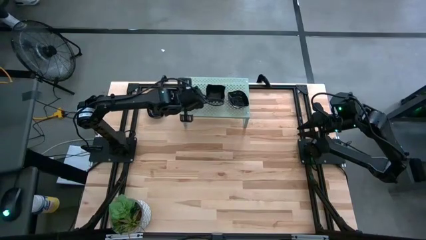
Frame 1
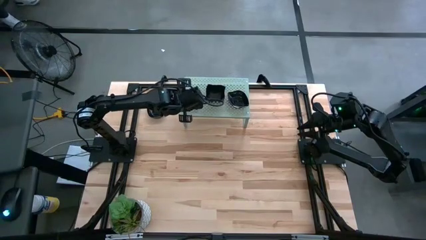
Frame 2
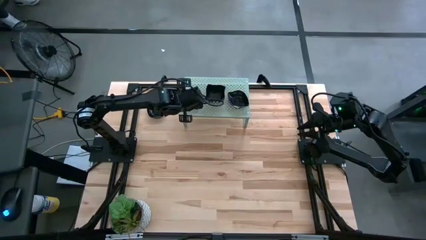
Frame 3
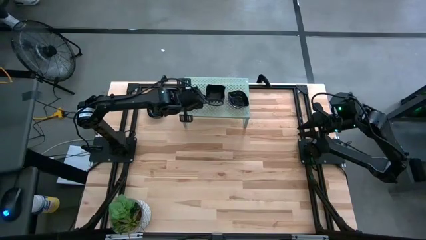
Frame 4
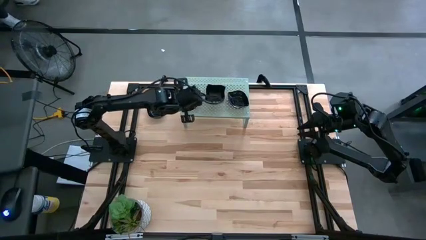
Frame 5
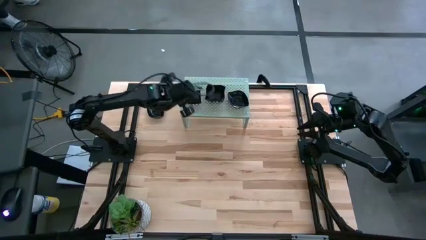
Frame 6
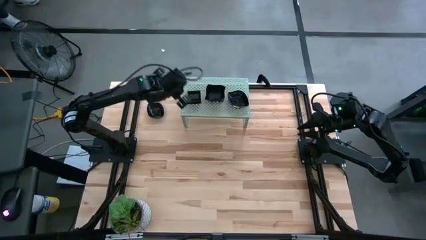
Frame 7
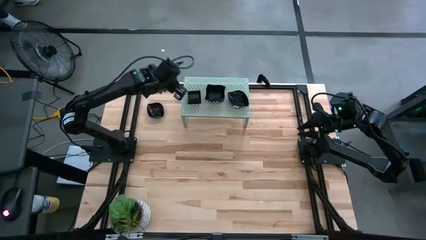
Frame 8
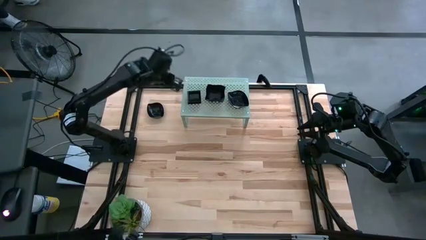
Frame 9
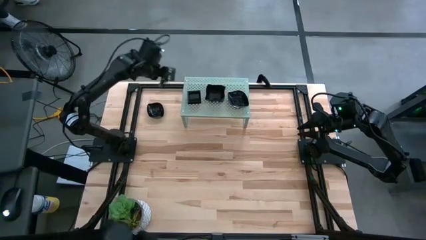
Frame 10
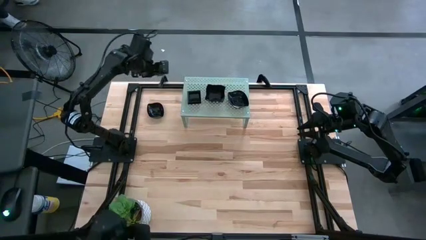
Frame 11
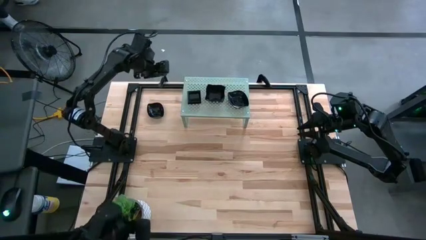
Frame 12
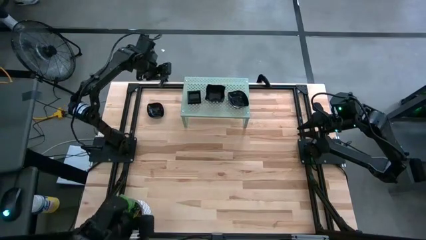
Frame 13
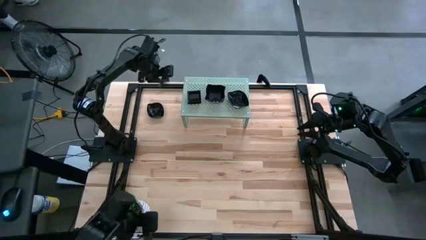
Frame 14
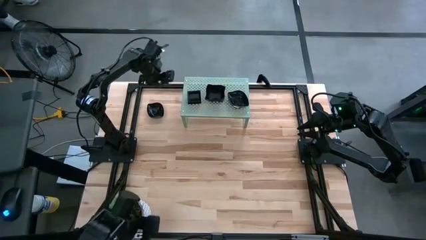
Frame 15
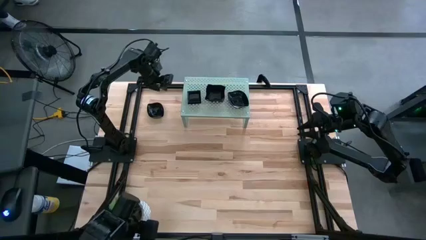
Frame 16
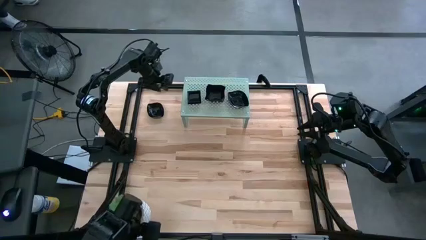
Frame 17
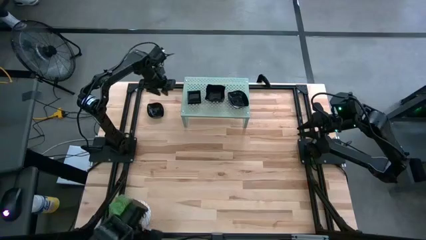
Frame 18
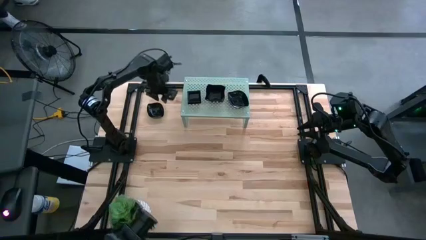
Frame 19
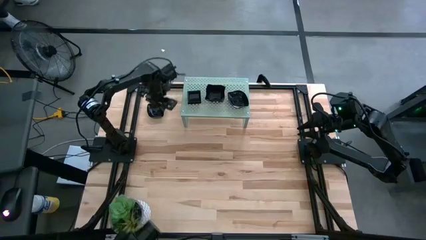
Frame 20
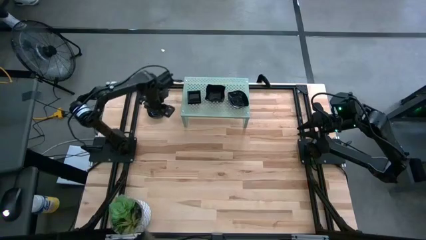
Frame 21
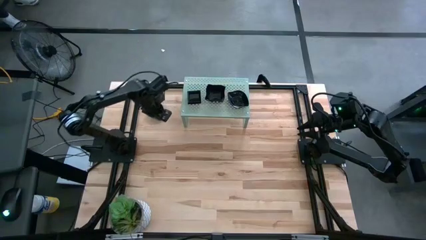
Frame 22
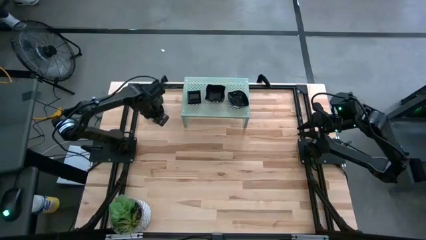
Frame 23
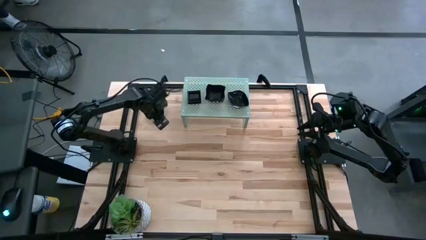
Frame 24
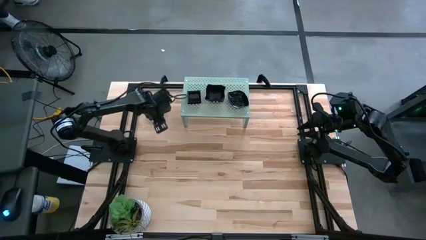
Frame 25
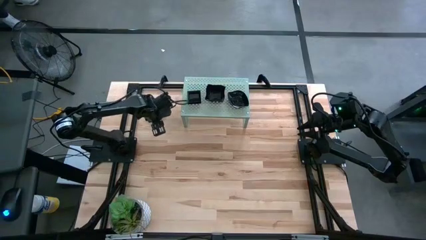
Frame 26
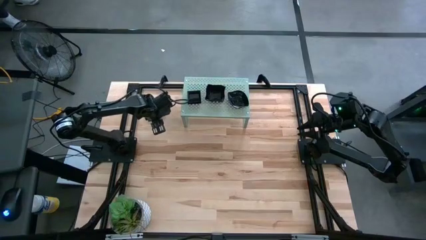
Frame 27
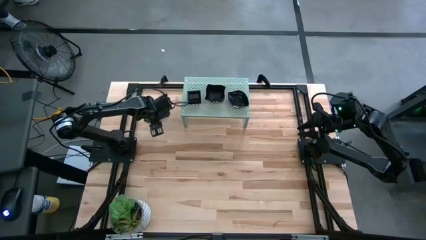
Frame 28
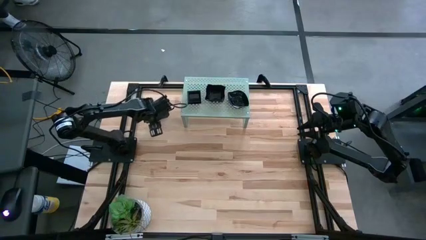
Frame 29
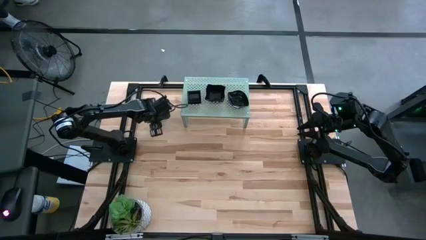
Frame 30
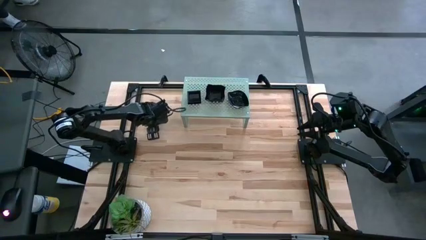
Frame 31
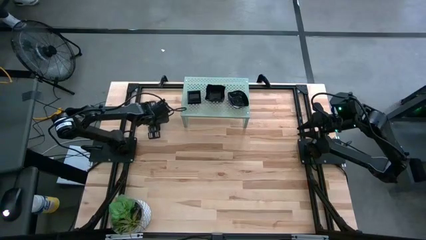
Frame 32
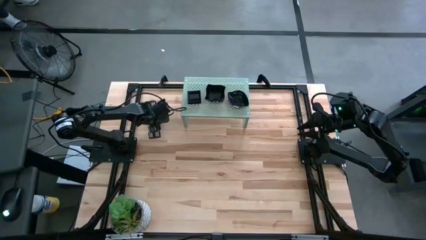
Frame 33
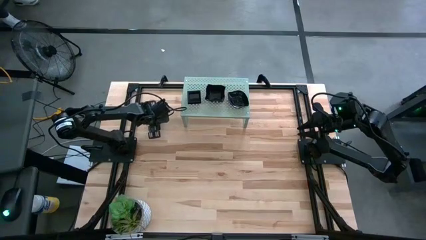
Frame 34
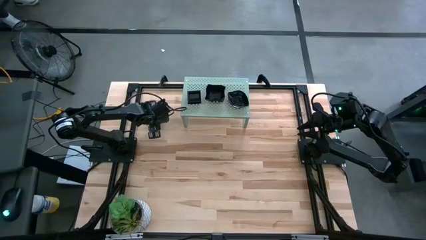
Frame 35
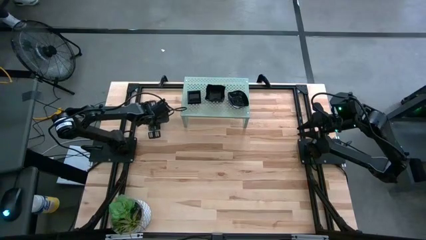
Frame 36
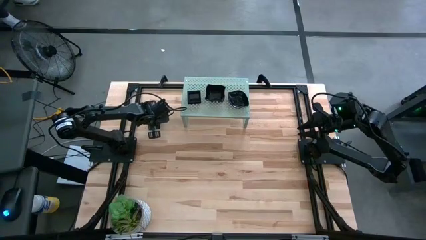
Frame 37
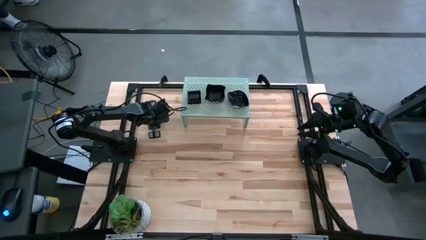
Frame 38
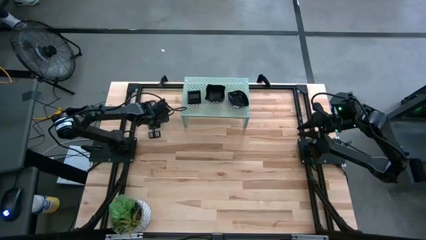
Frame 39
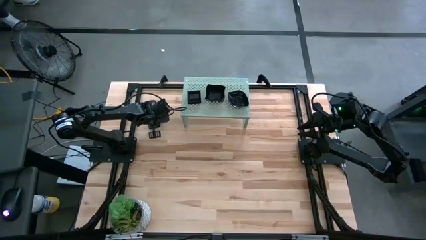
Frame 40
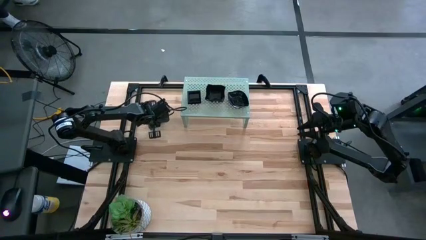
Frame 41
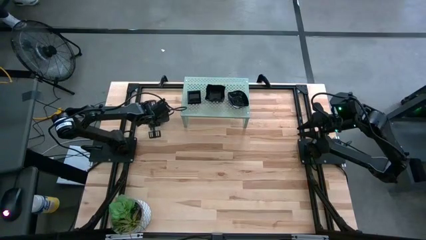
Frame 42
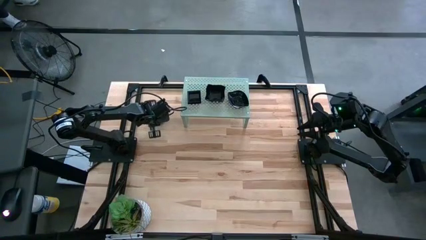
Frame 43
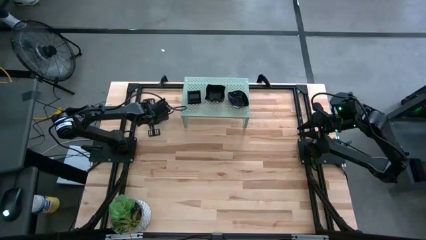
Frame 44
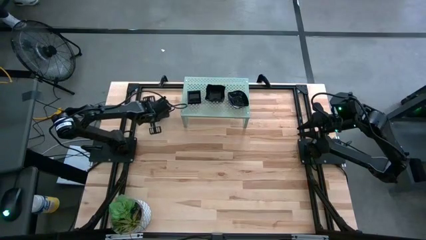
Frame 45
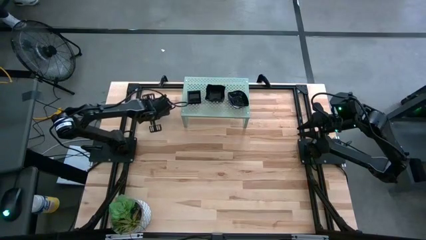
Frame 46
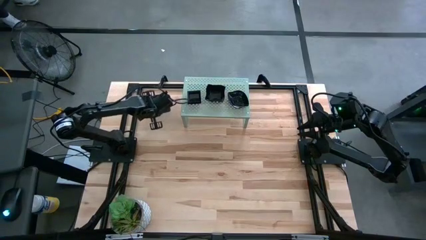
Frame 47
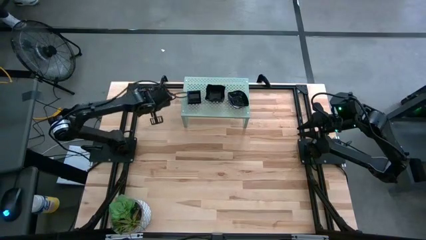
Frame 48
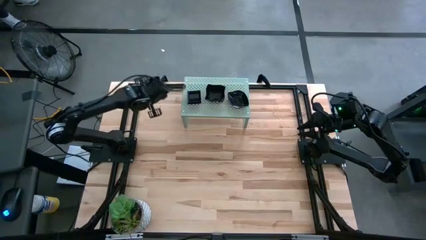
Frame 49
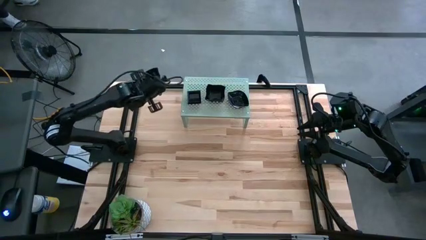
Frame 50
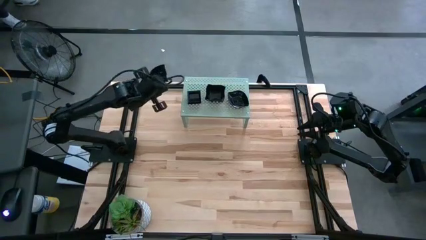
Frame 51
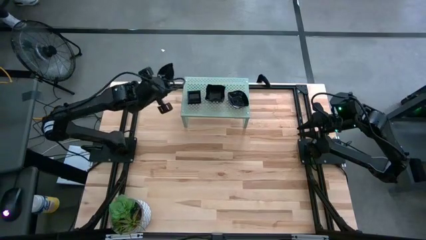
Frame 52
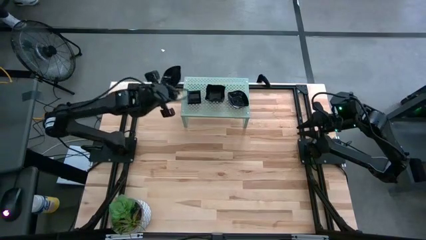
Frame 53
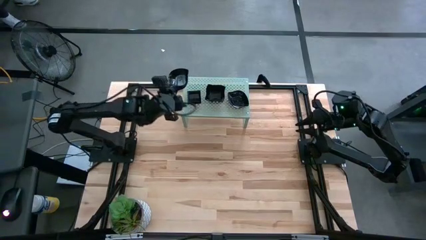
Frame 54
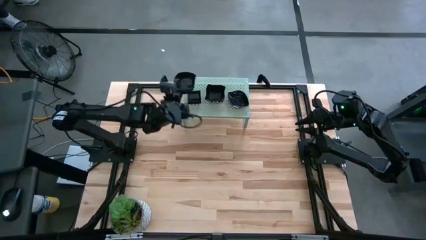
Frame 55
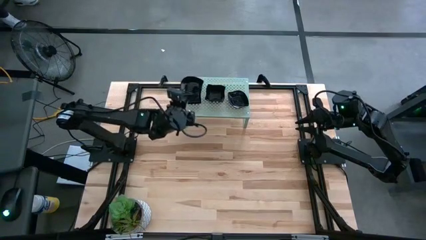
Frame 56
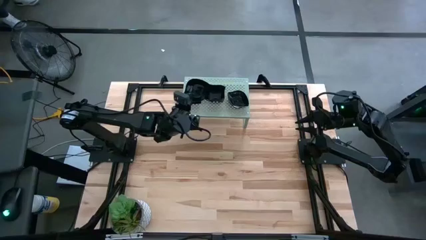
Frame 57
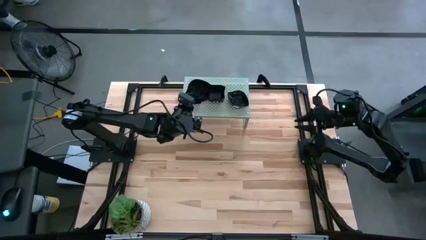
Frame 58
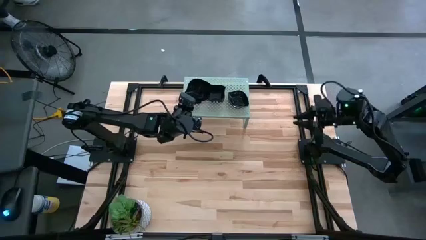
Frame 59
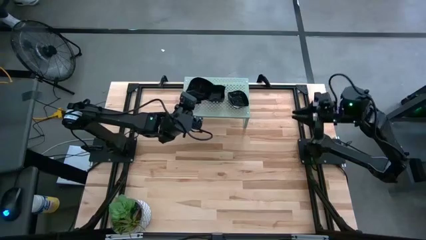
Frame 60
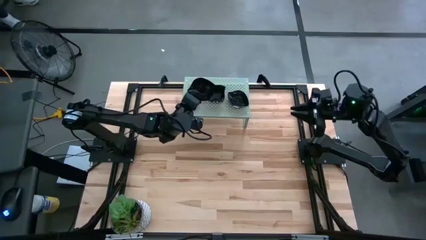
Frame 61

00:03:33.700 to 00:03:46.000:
Task: Pick & Place Mini shaped plates
Stack the leaf shaped plate on top of the leaf shaped plate on the shelf
